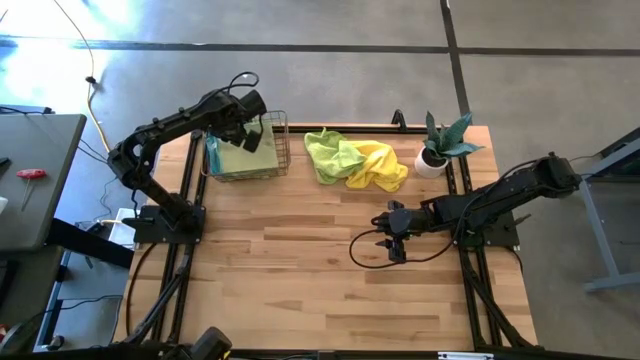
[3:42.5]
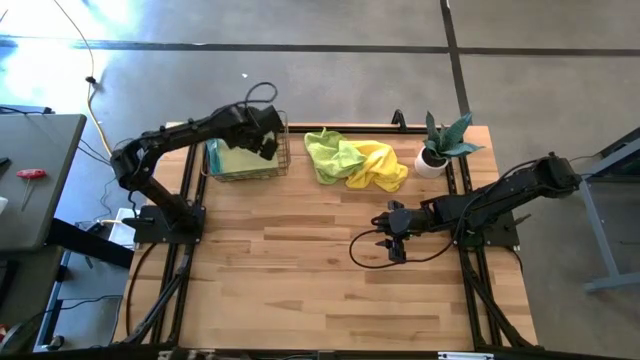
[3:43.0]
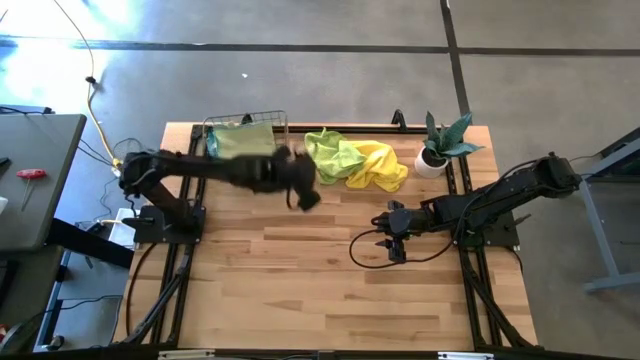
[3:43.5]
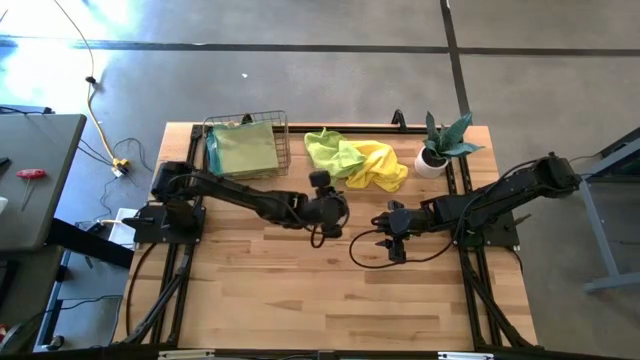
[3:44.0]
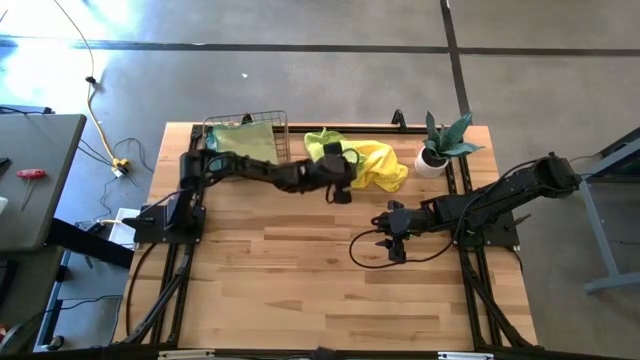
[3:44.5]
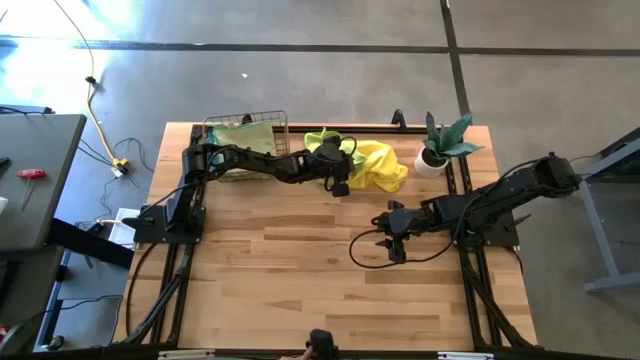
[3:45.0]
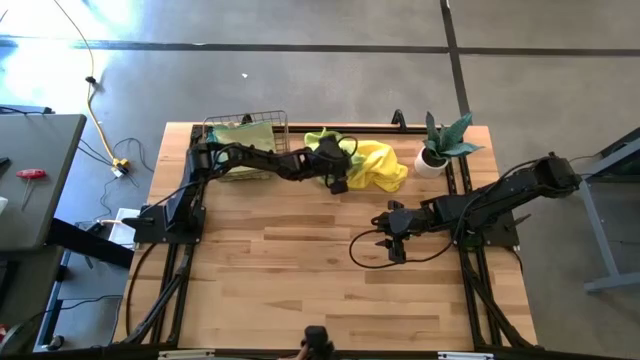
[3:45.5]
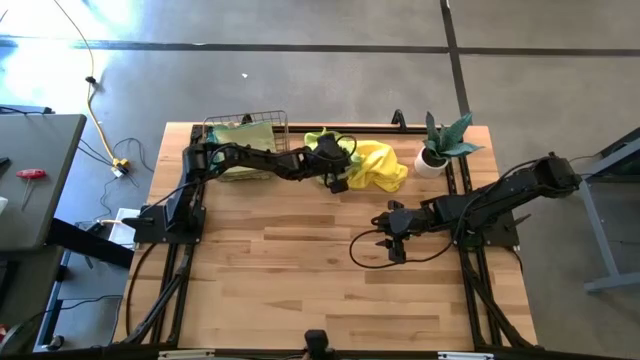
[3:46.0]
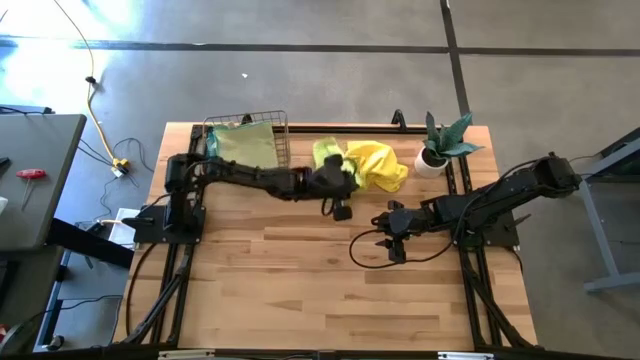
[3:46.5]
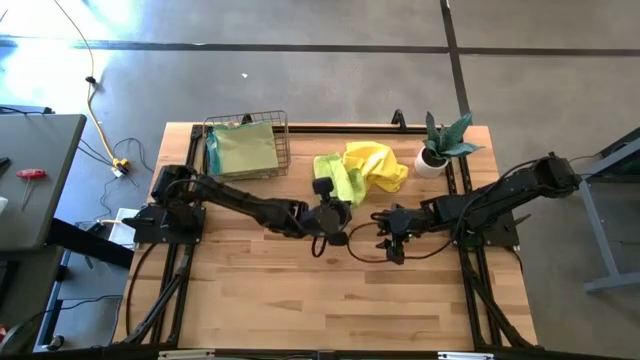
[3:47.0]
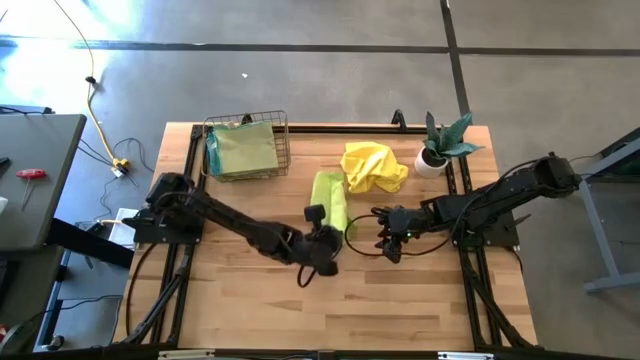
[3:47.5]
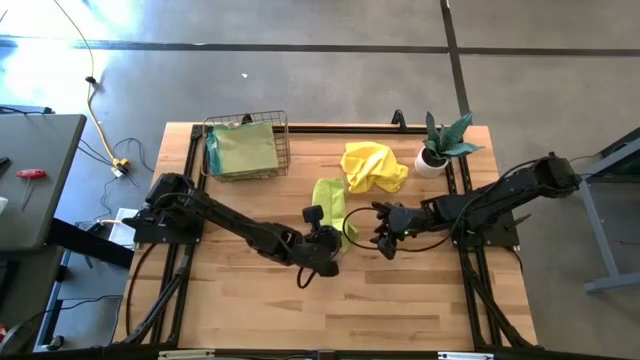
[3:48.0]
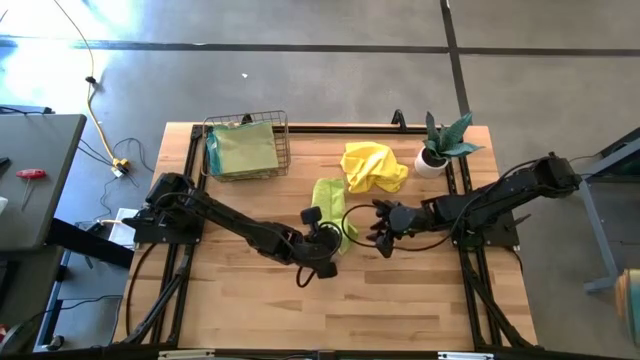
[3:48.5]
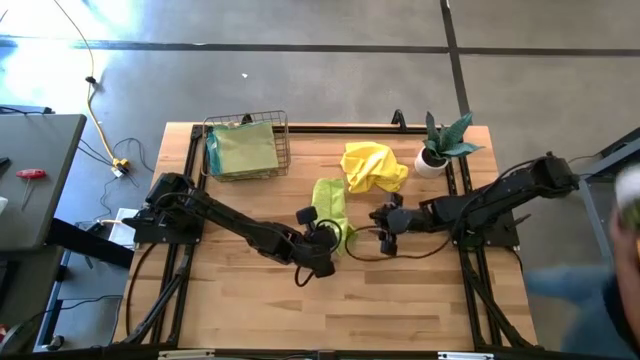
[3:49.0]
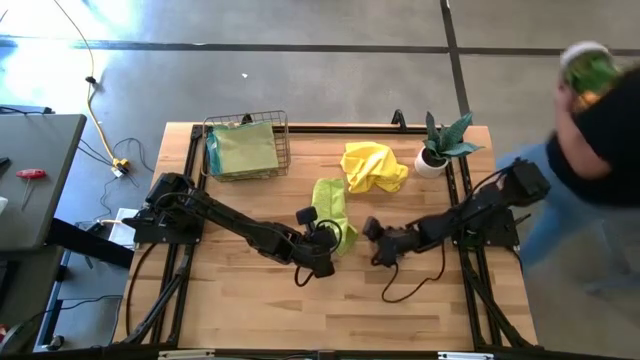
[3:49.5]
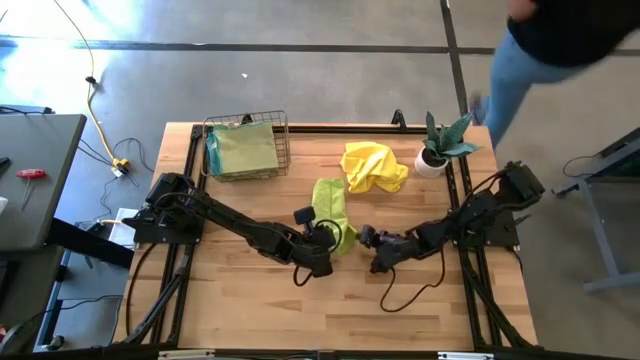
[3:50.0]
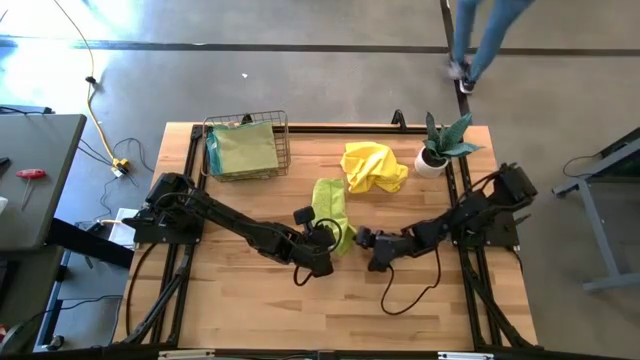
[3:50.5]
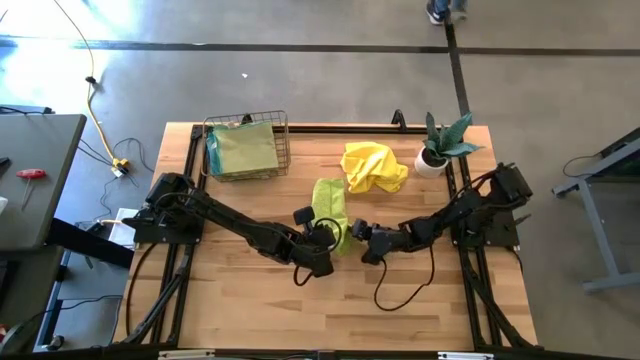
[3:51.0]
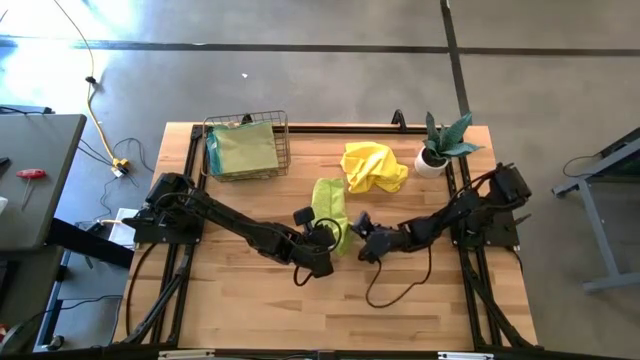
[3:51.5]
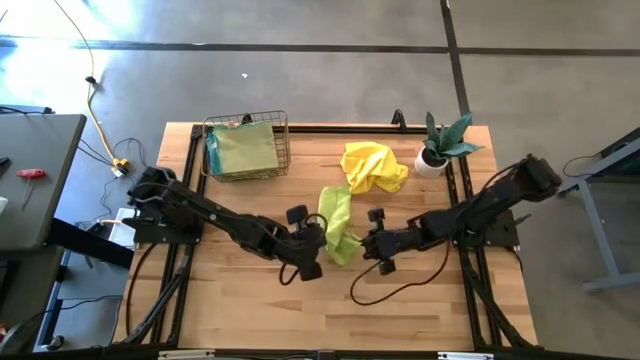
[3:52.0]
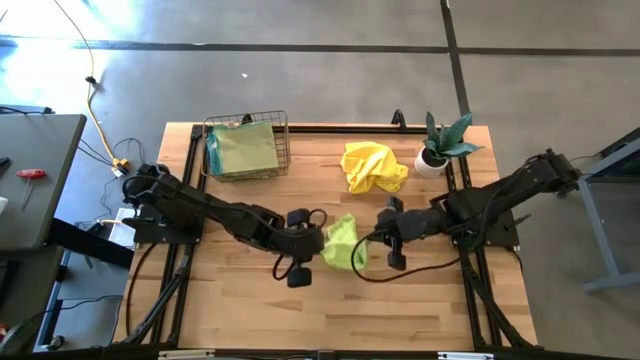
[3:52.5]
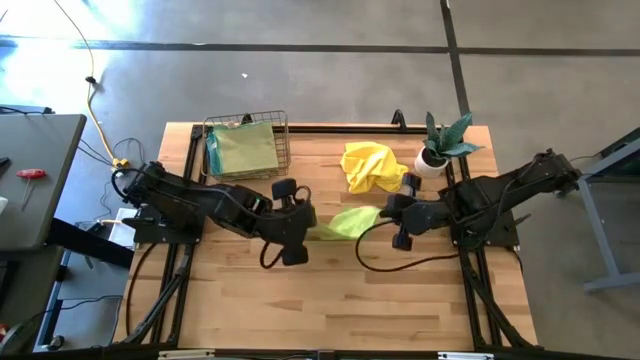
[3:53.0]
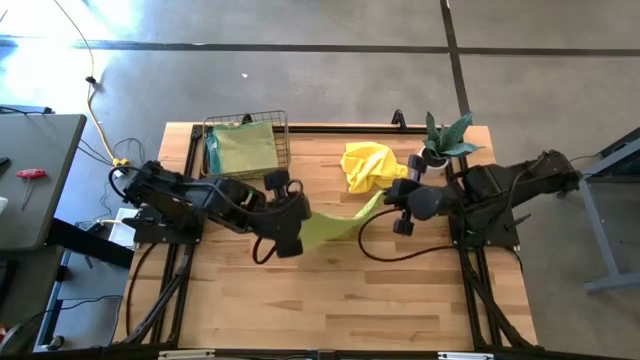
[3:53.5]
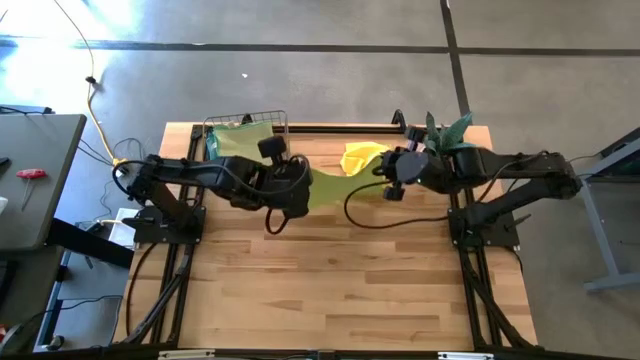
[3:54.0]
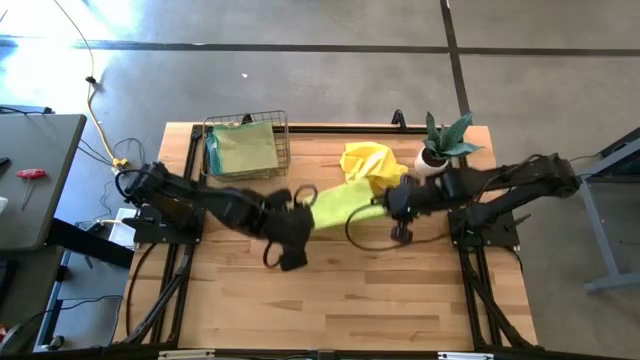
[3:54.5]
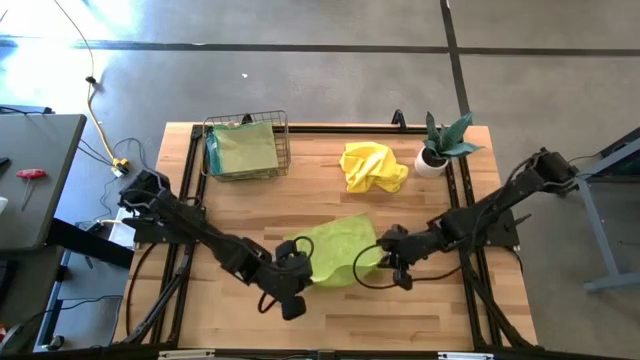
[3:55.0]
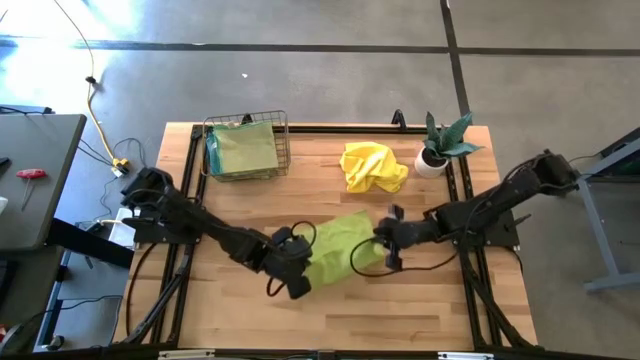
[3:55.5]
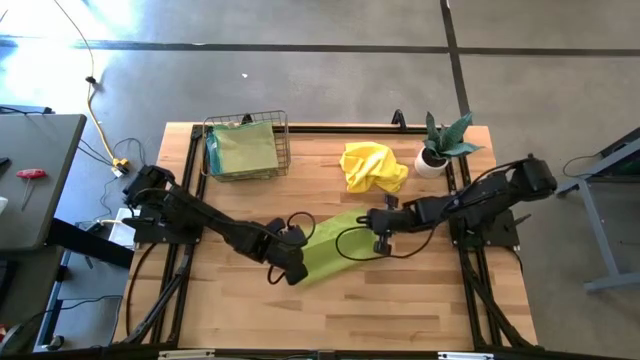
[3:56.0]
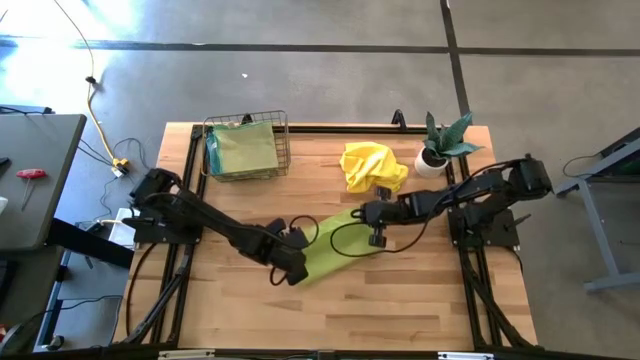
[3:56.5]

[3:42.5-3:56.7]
Task: Fold microfiber towels
Fold the light green towel

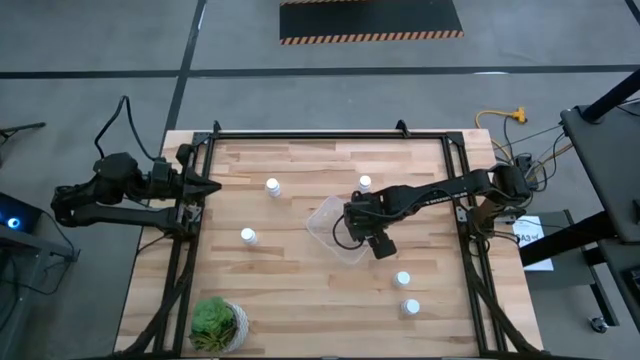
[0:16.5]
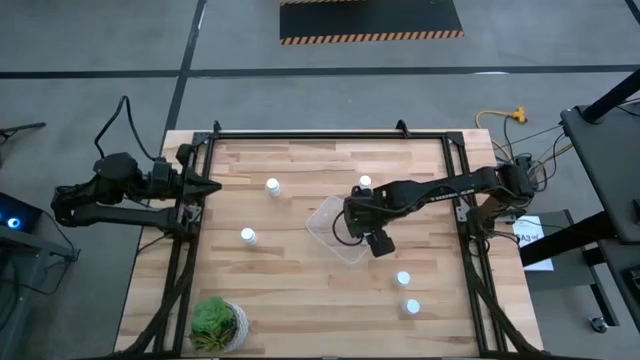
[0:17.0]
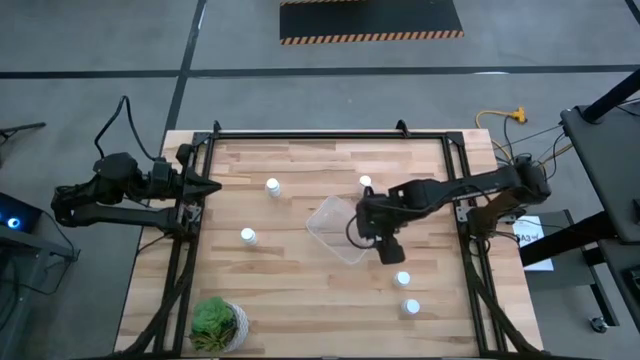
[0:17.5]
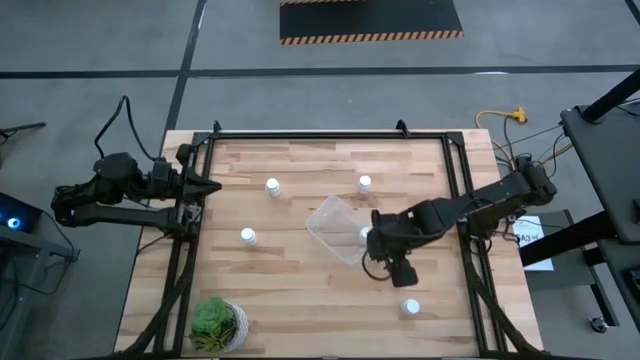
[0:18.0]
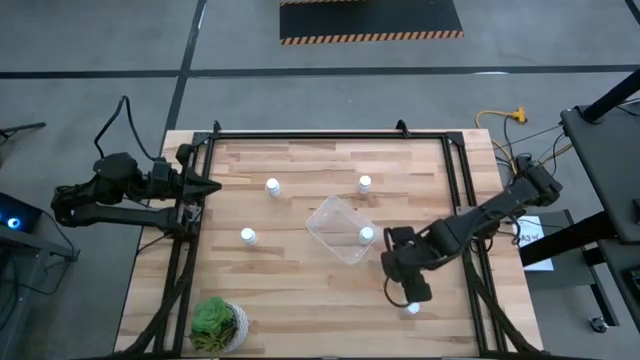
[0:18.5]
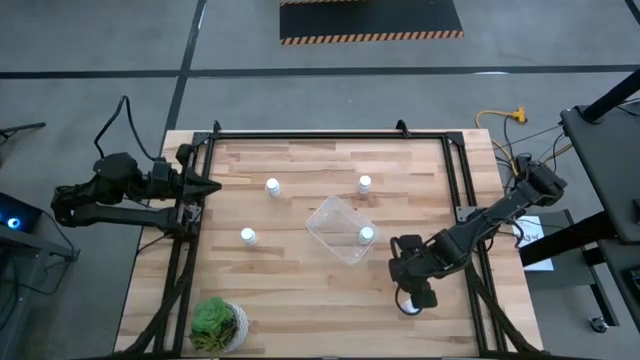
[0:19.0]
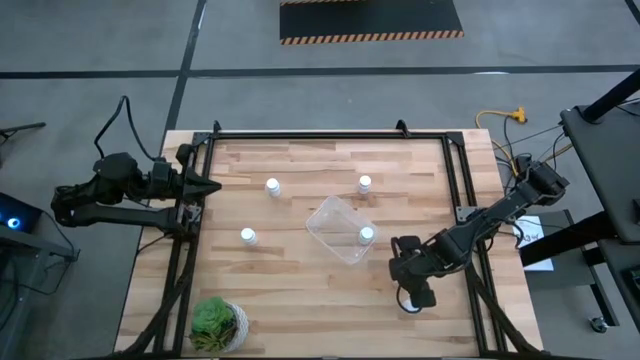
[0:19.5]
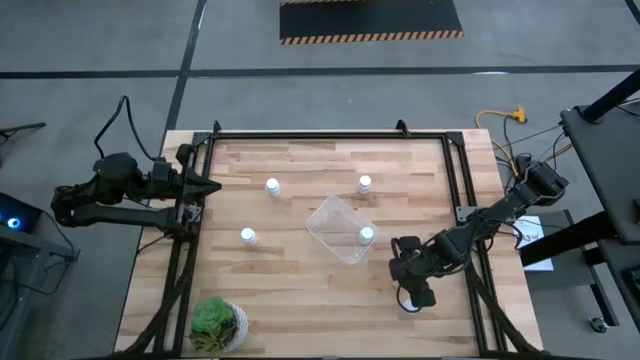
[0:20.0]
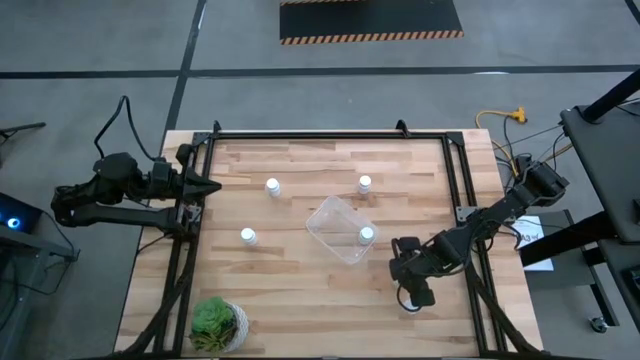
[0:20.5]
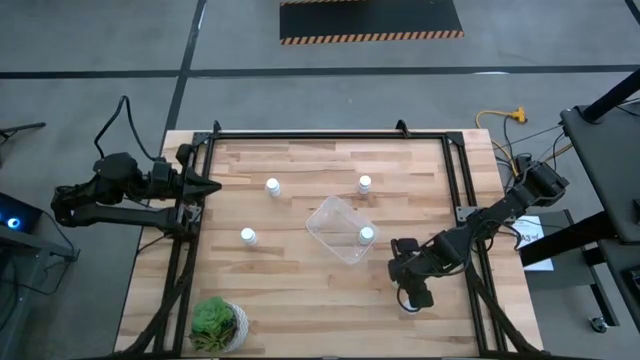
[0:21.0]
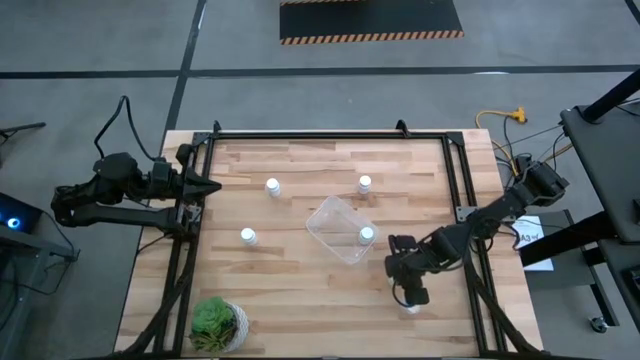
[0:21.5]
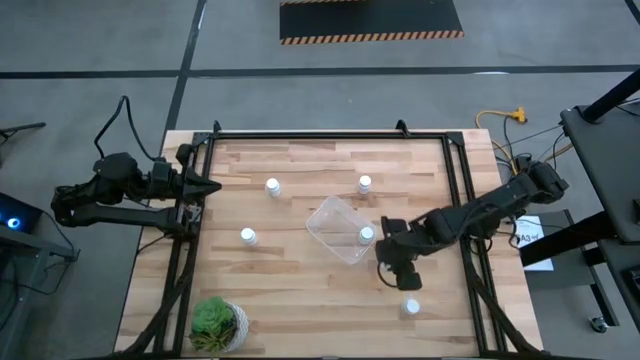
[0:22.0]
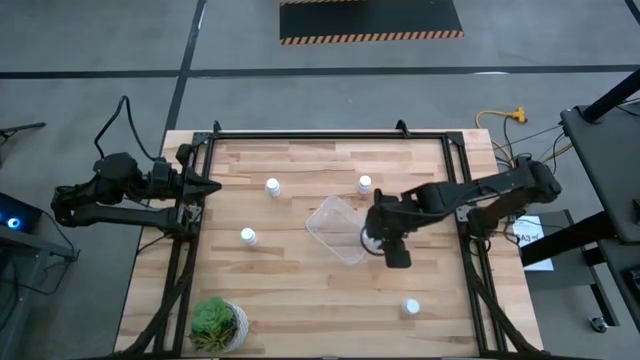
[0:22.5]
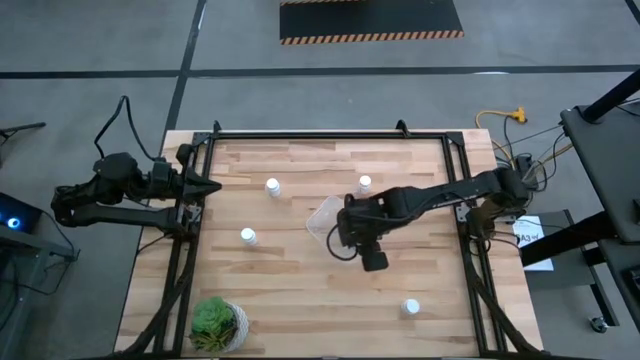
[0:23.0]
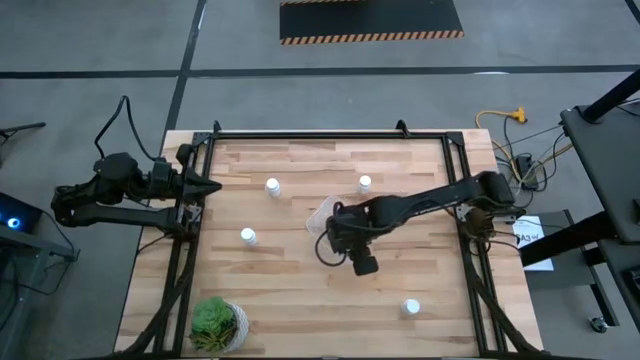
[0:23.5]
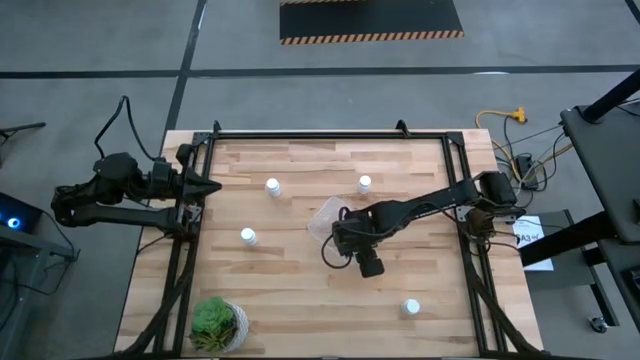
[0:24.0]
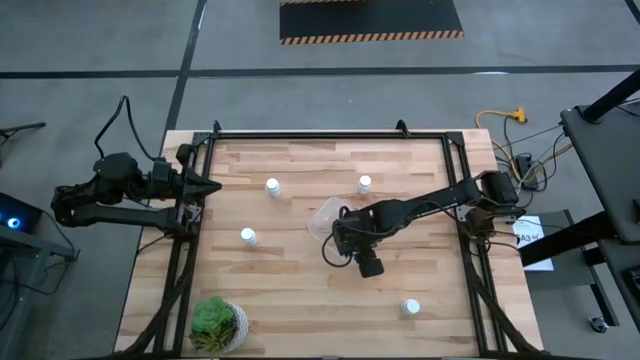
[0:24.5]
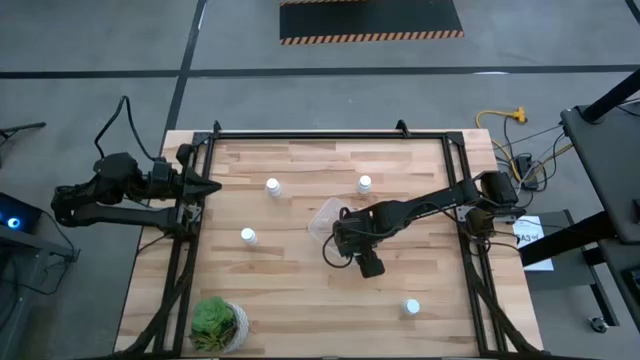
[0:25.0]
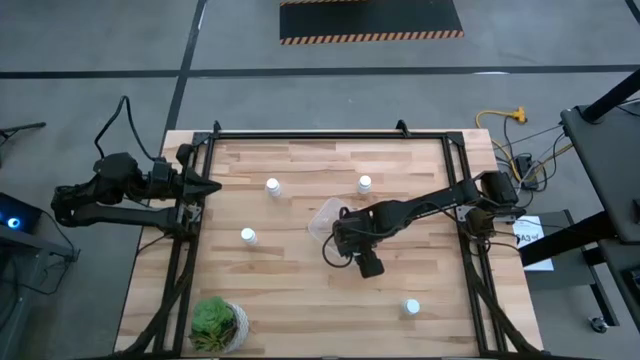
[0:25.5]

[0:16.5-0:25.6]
Task: Pick and place pill bottles into a basket
Put the white pill bottle into the transparent bin
